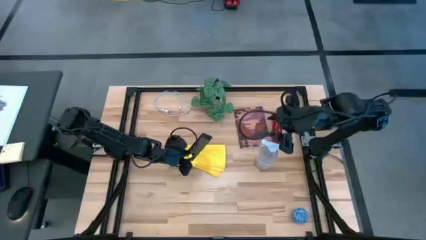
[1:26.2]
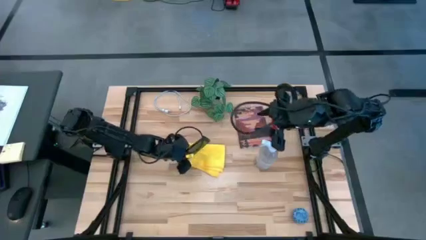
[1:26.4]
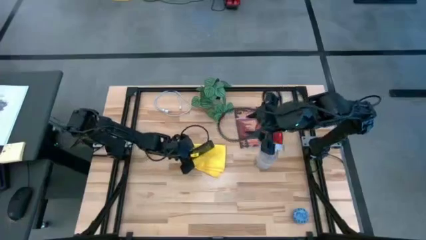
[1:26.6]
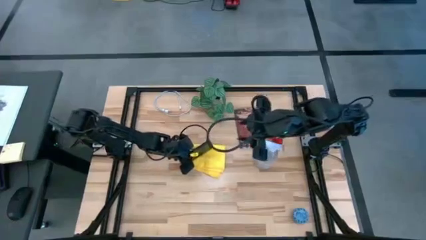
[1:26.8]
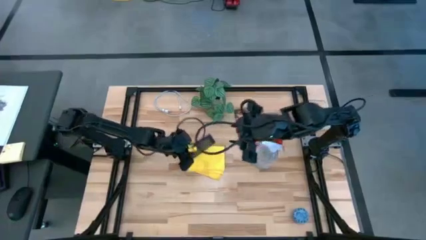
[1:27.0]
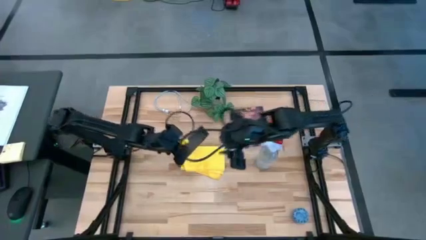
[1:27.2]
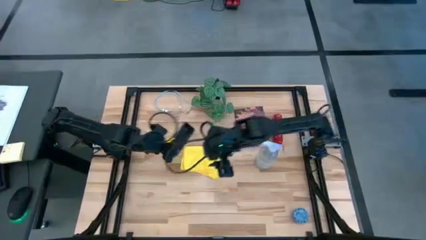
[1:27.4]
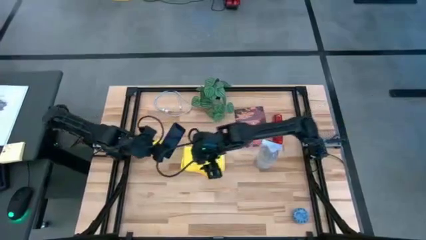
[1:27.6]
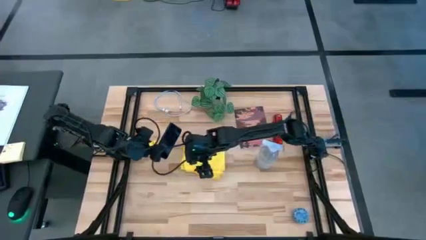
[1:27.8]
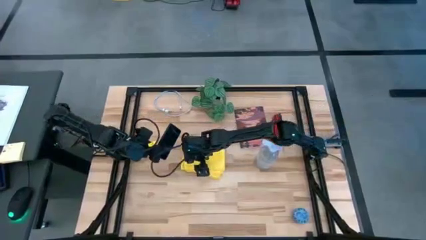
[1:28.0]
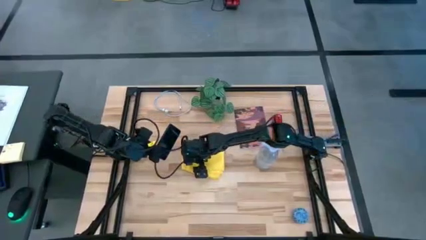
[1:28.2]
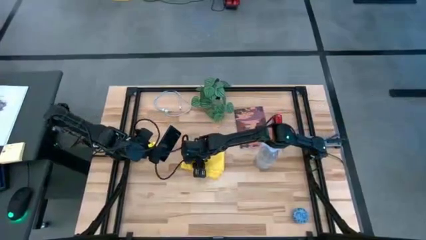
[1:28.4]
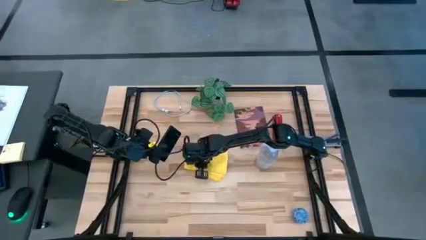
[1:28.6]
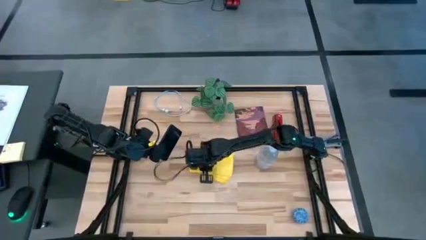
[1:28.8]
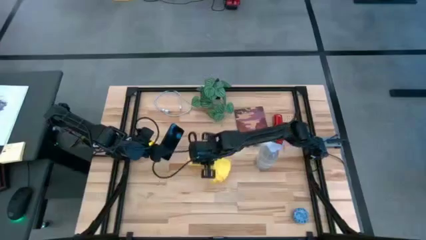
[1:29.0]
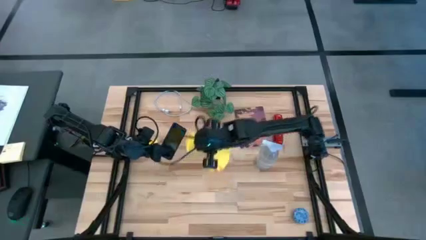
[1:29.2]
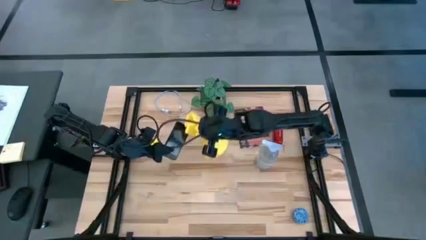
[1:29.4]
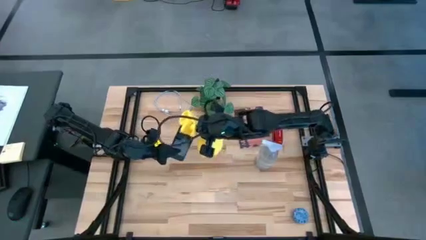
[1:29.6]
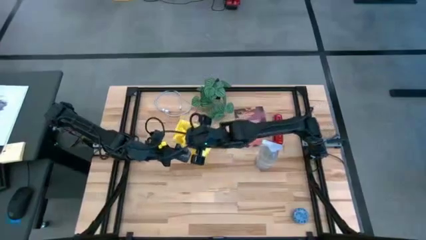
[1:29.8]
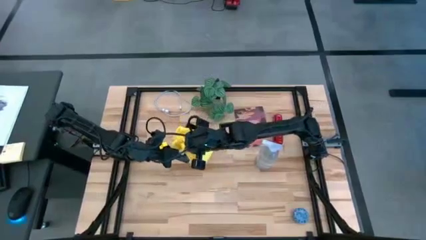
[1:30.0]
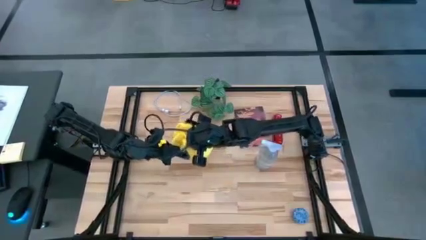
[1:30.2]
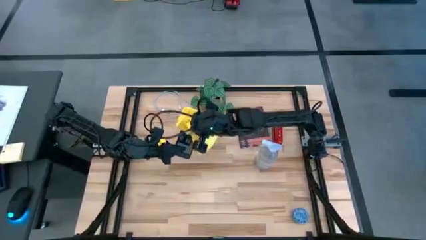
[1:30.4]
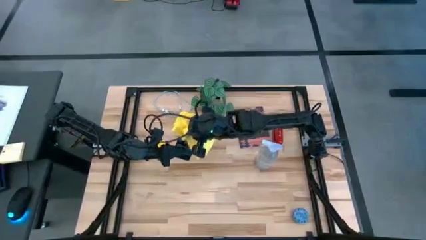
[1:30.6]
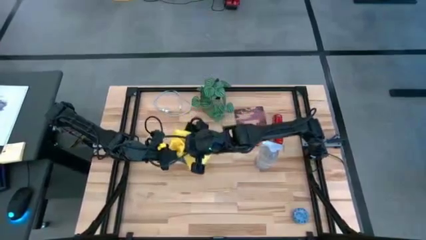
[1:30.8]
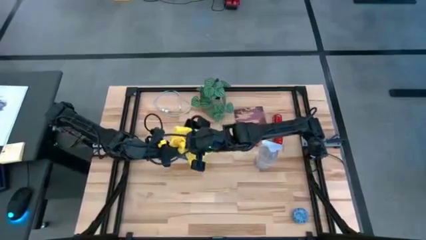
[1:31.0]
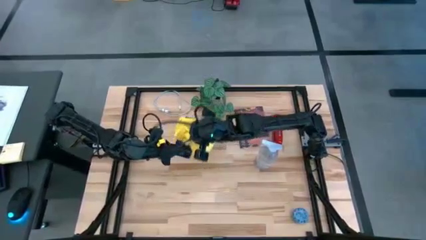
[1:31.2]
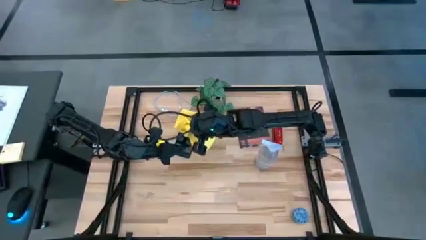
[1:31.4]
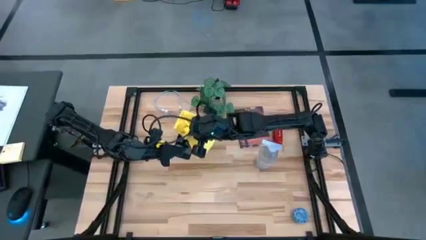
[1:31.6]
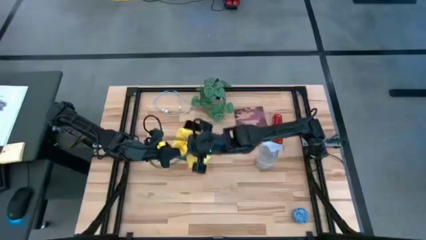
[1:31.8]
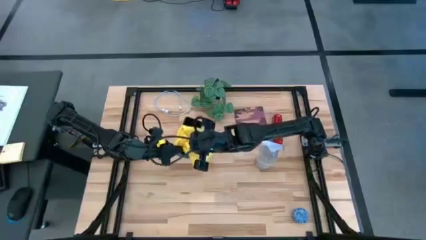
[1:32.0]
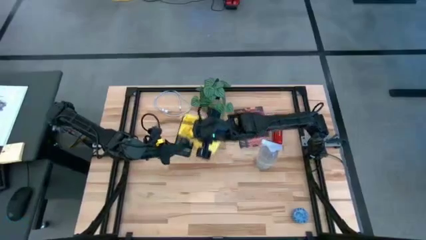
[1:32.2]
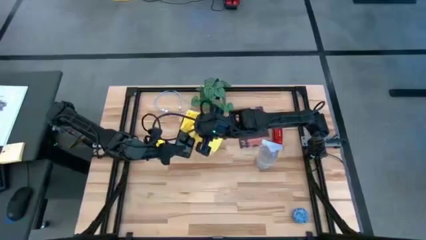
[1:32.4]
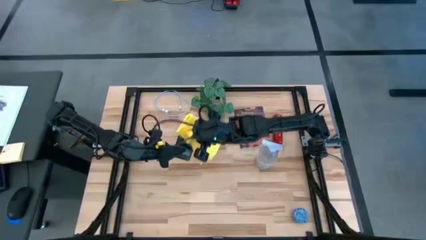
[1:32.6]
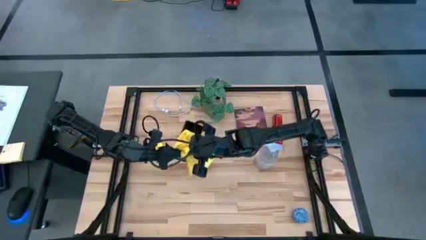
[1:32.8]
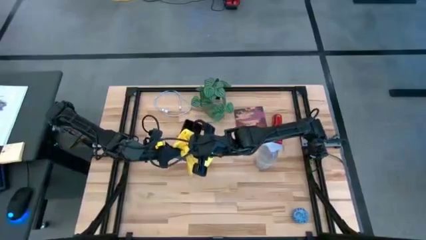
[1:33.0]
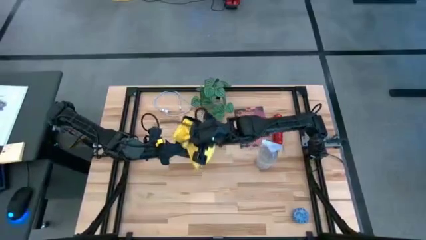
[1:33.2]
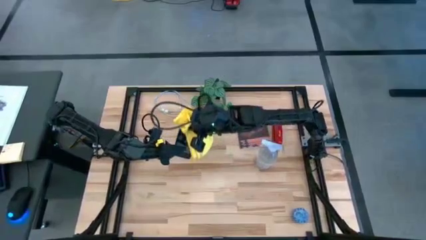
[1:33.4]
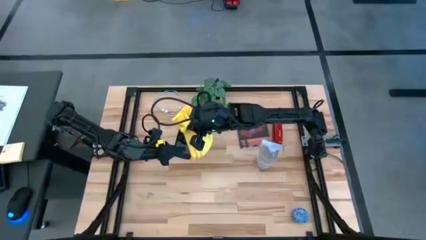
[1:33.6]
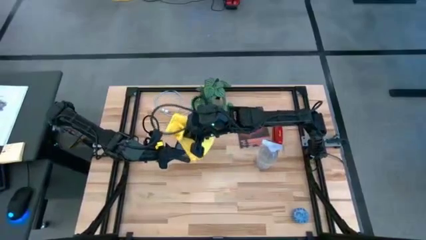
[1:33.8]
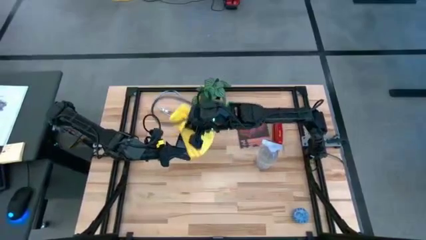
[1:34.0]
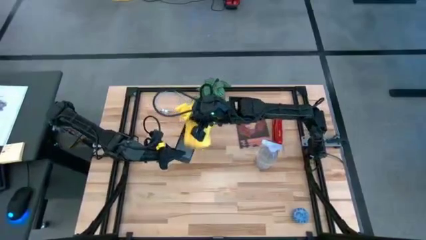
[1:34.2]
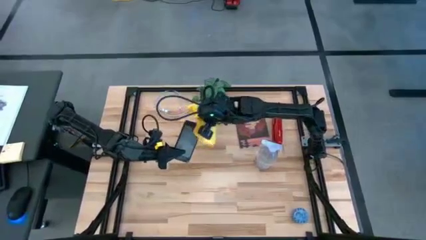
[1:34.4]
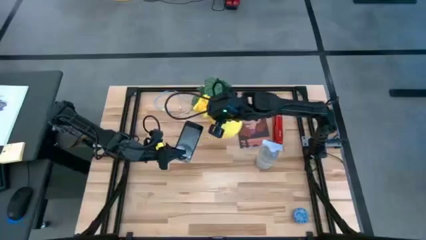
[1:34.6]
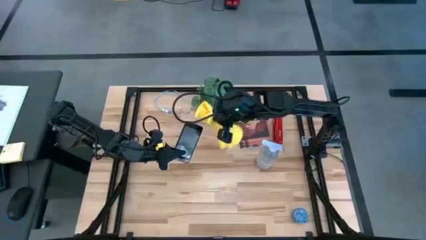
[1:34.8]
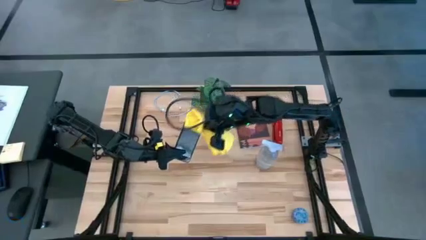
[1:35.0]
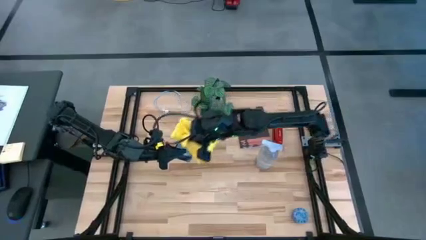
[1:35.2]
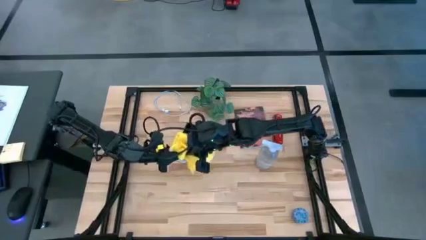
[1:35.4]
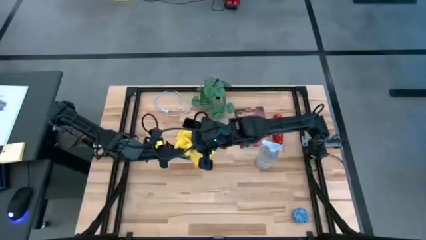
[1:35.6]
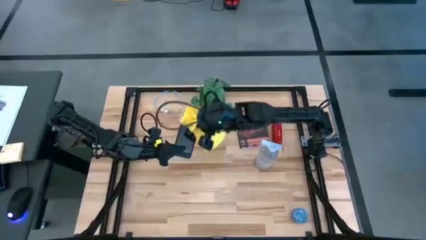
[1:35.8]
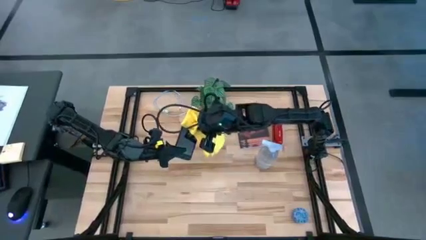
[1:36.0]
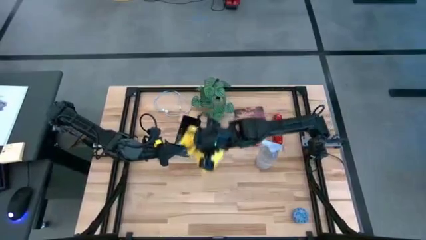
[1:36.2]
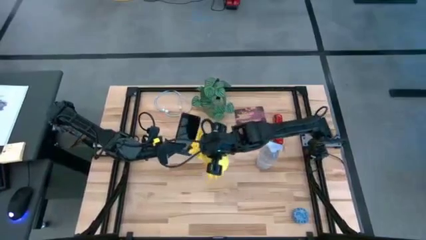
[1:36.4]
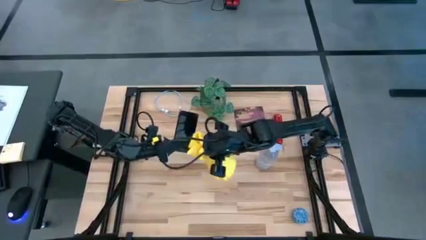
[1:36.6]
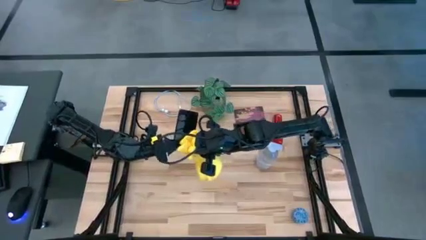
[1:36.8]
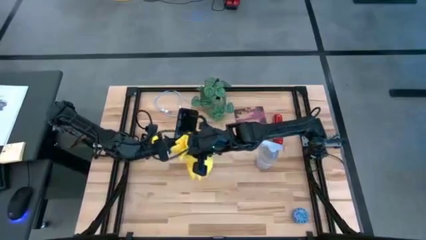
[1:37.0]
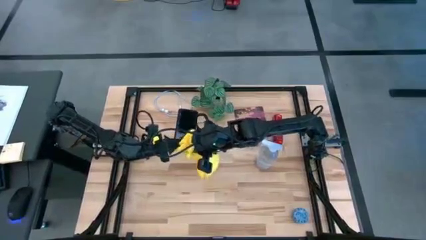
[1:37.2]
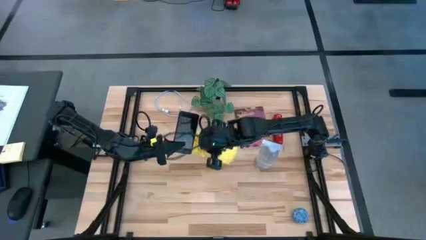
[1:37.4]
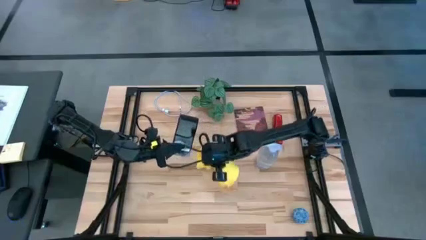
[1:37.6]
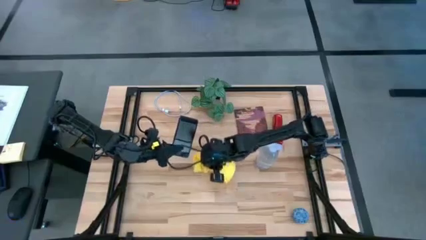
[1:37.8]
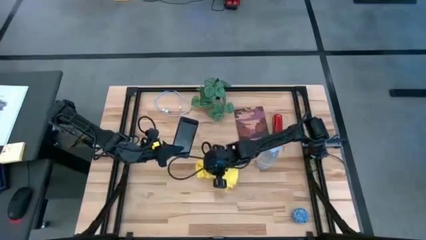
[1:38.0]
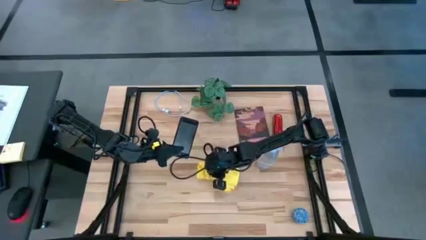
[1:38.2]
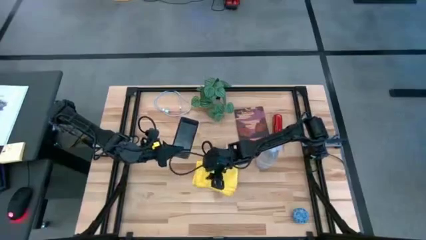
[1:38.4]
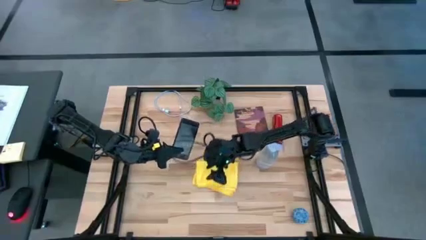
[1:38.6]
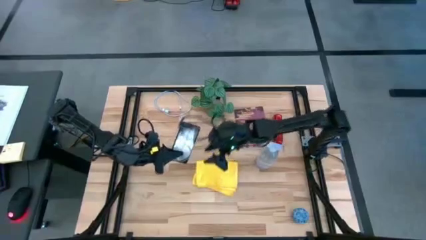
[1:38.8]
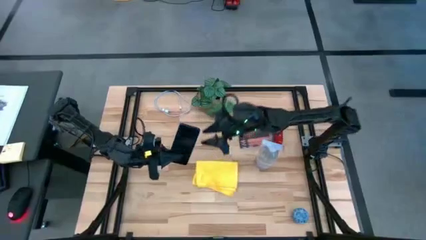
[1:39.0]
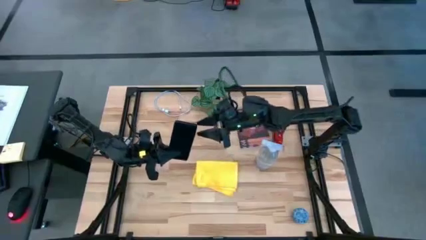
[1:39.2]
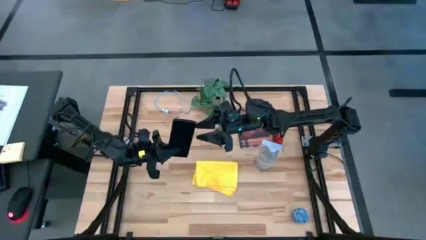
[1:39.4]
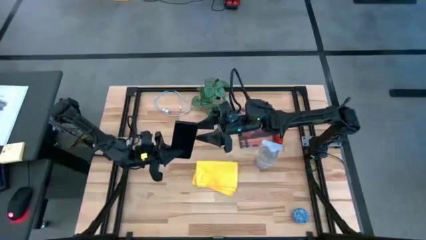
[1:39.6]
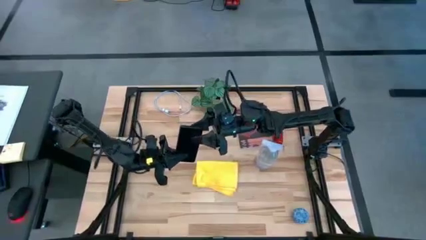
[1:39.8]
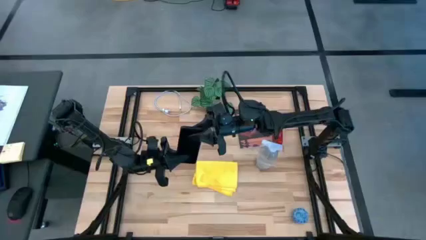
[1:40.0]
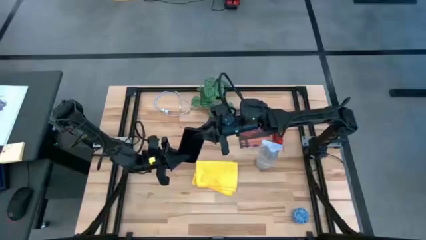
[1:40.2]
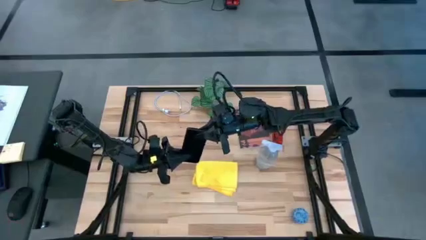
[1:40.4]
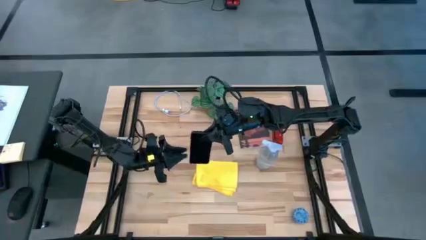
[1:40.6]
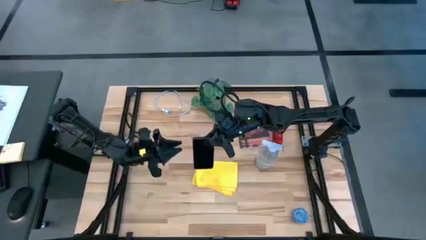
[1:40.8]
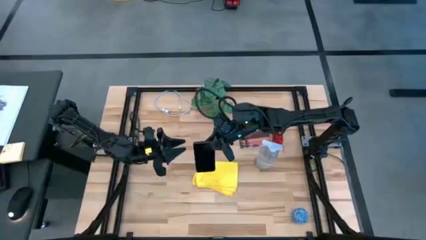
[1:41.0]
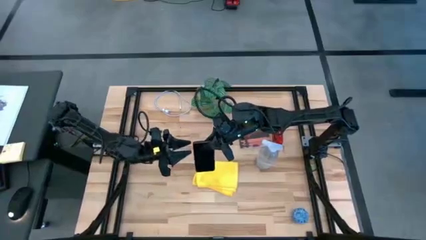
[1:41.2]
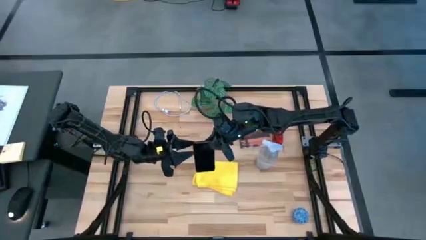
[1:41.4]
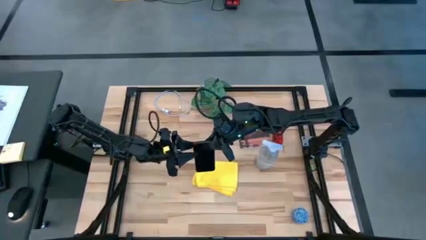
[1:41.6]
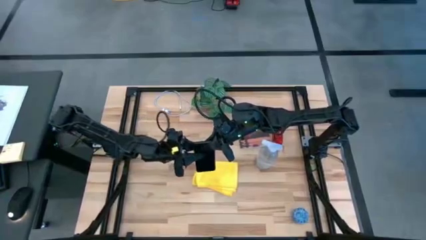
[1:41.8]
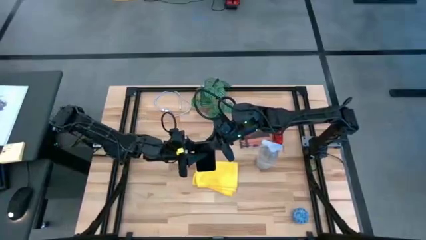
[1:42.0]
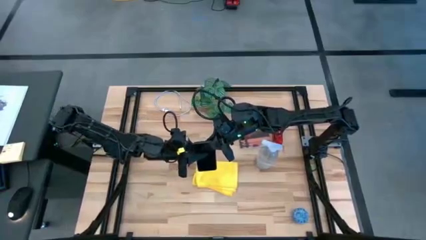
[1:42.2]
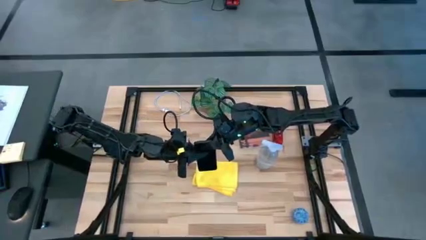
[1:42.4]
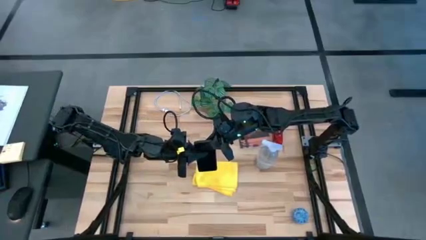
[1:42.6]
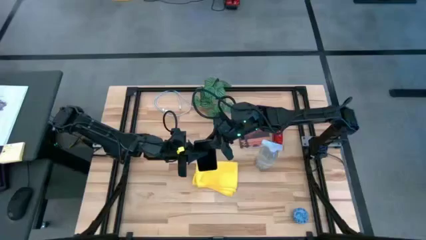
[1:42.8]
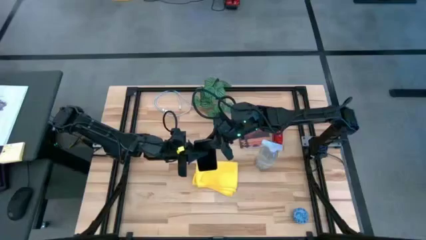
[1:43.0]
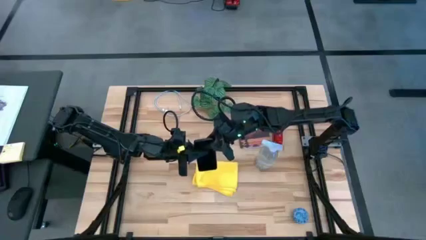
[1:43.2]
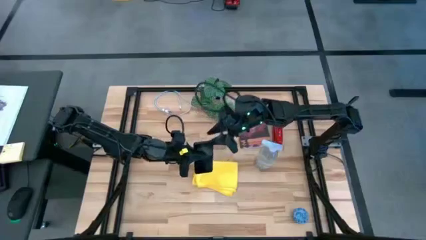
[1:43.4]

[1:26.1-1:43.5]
Task: Apply microfiber cloth
Wipe the front of the black cellphone with the yellow microfiber cloth
